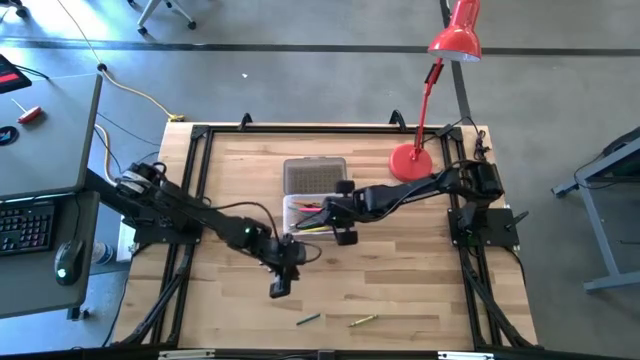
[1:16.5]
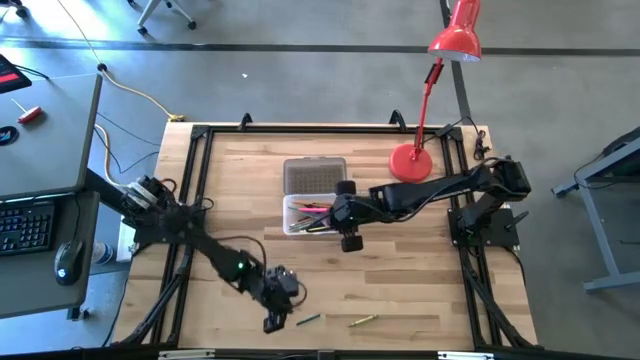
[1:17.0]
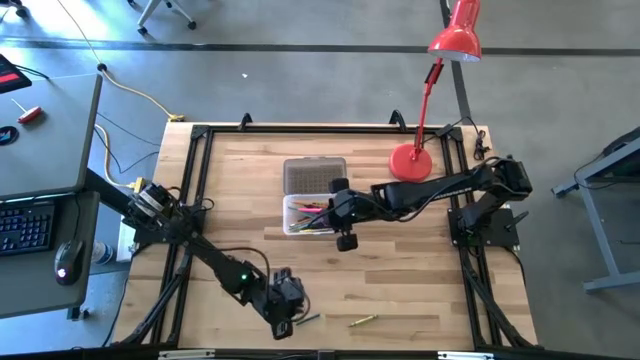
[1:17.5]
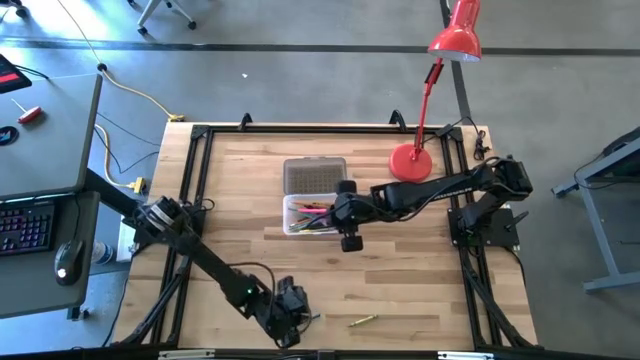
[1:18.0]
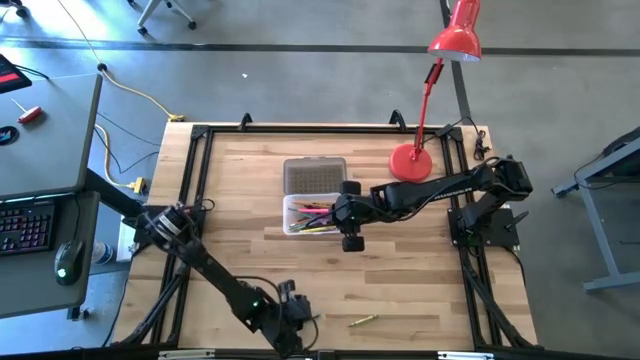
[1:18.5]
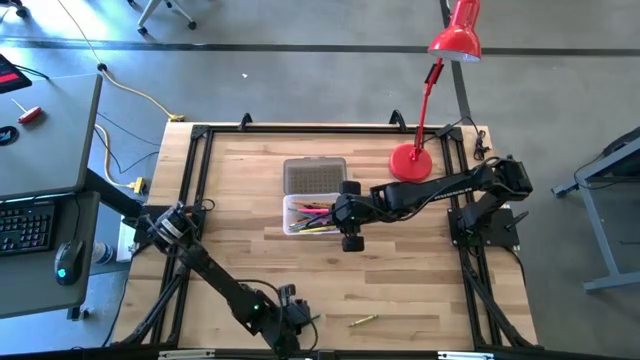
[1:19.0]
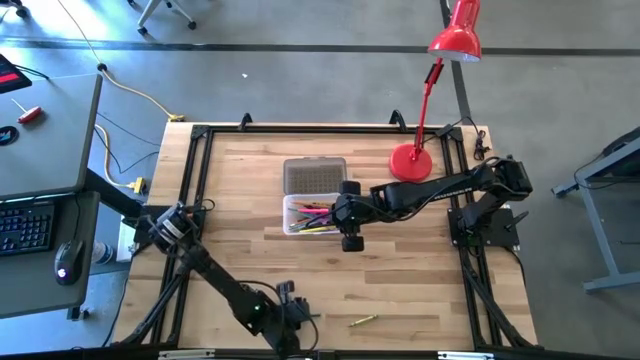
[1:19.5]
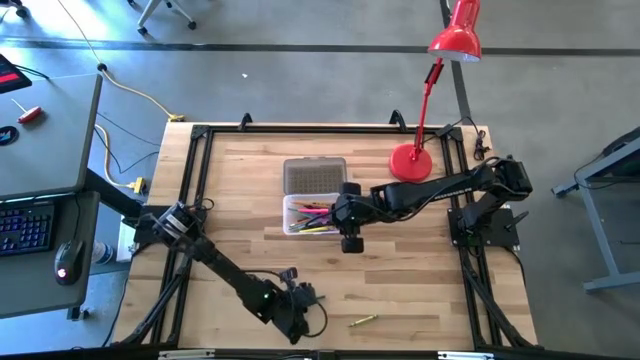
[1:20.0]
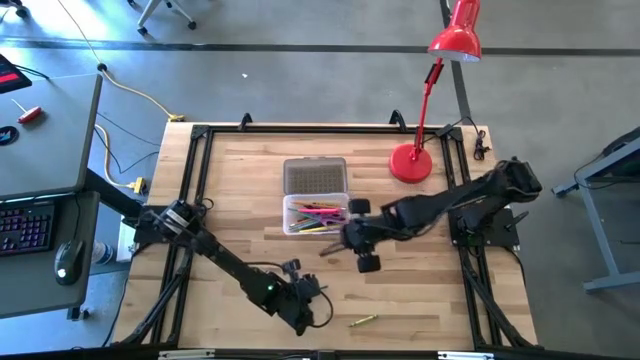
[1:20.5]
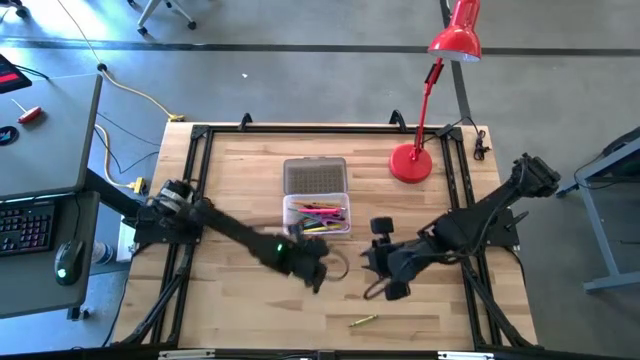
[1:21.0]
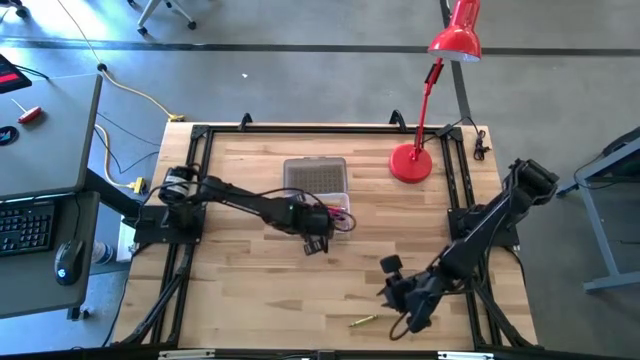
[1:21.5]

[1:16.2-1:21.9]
Task: Pick & place school supplies into a supply box
Put the dark green crayon into the supply box

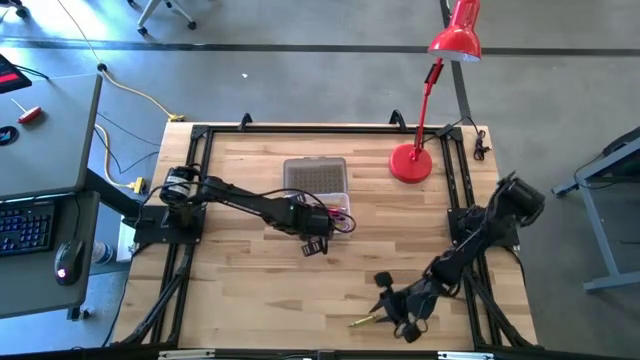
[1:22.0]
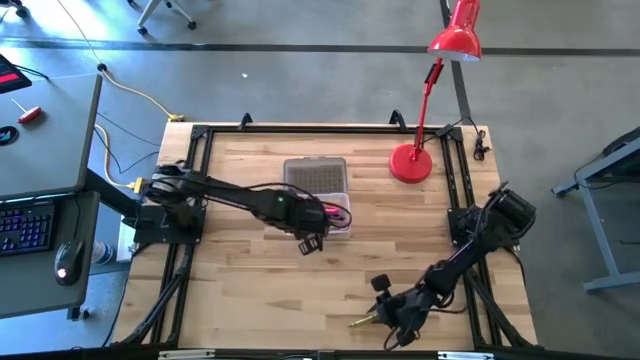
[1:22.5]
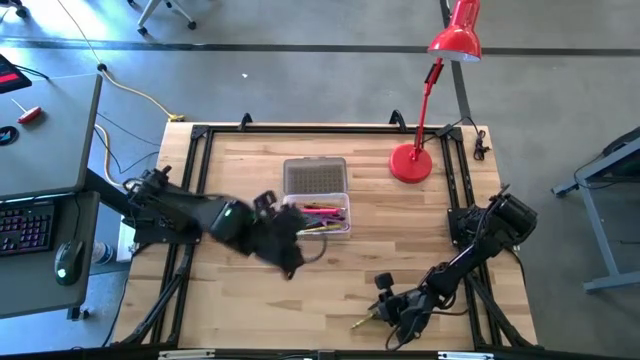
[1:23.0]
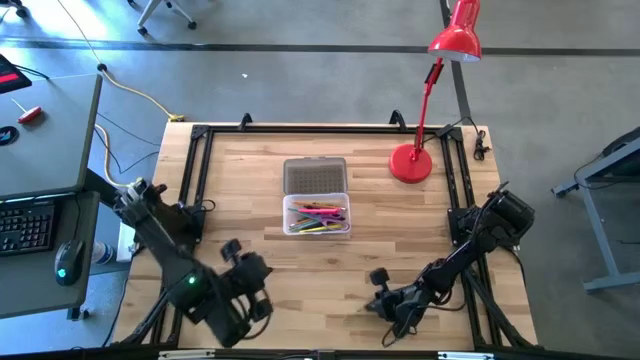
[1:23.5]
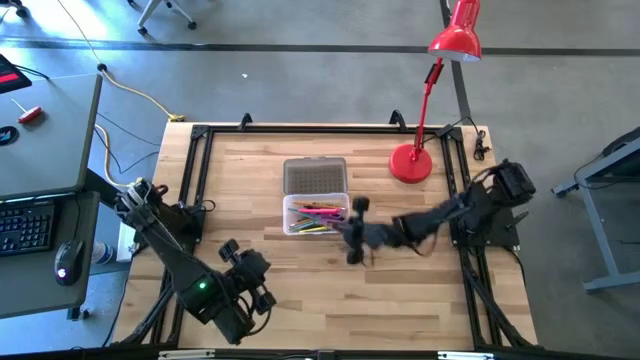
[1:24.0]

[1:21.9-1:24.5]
Put the green crayon into the supply box

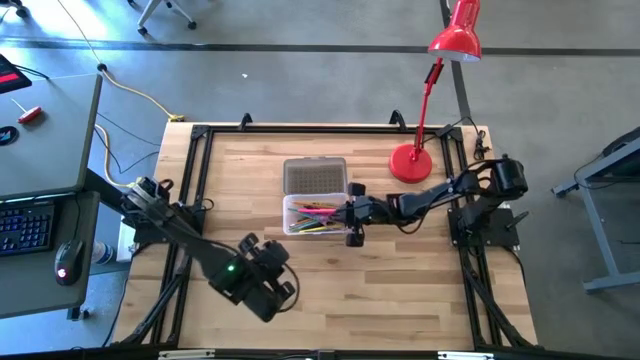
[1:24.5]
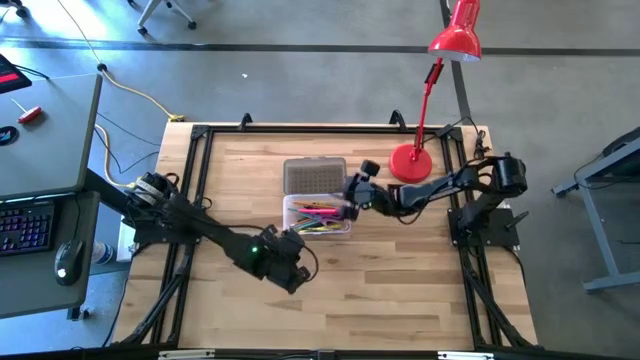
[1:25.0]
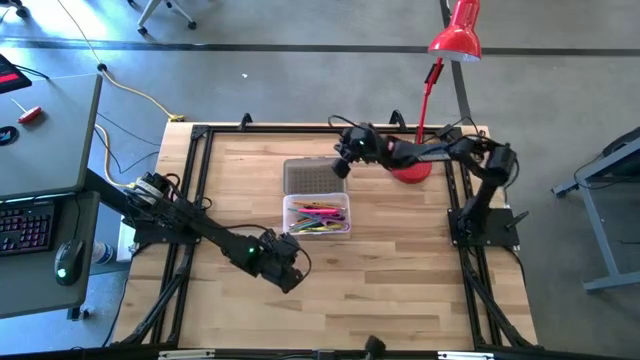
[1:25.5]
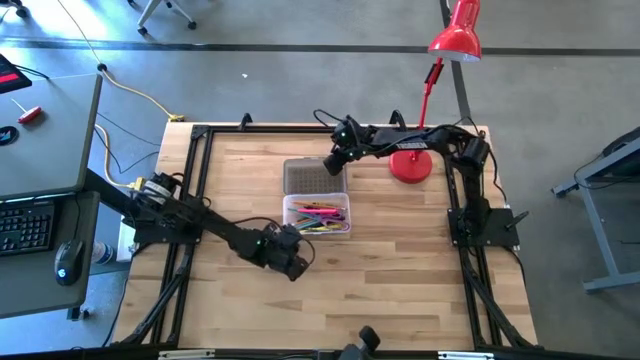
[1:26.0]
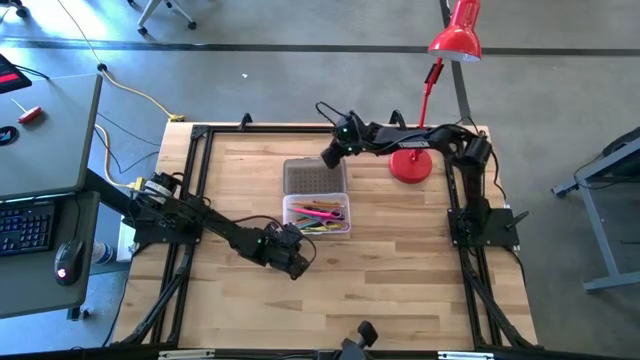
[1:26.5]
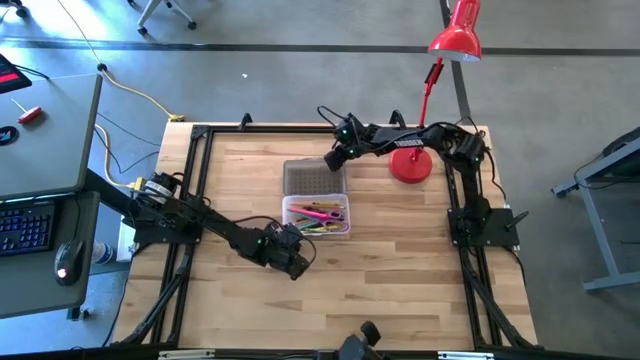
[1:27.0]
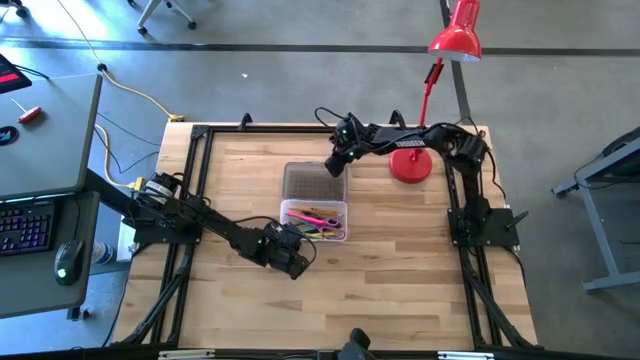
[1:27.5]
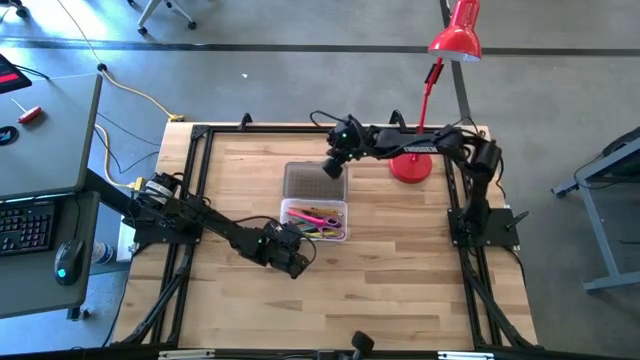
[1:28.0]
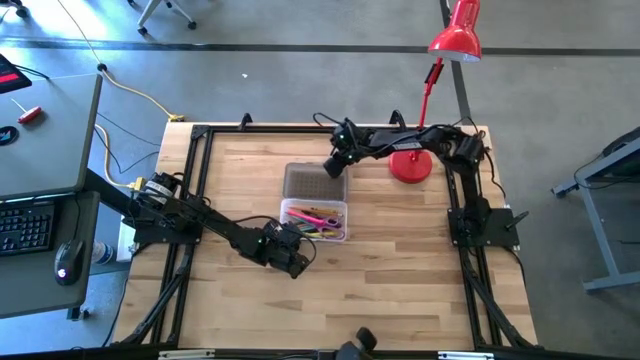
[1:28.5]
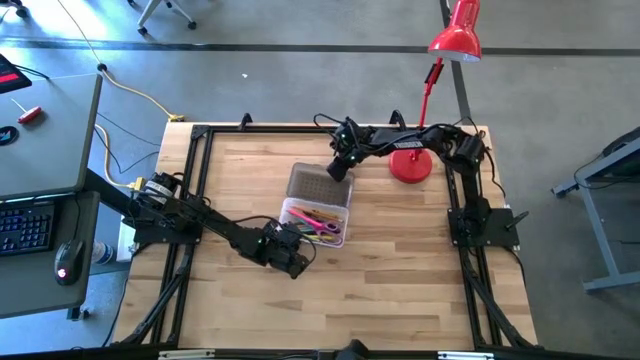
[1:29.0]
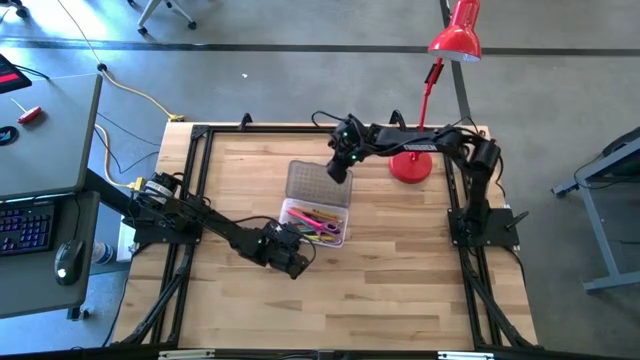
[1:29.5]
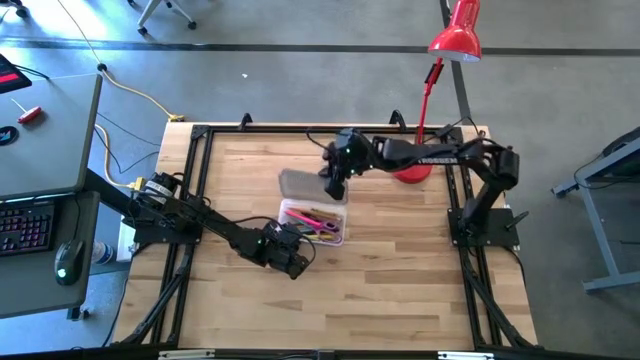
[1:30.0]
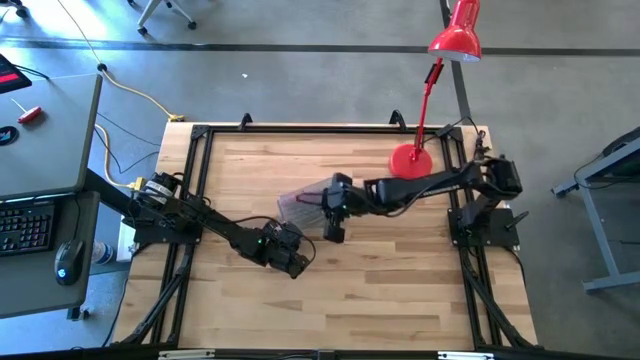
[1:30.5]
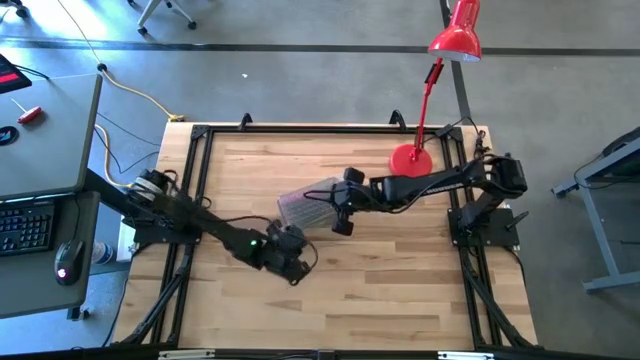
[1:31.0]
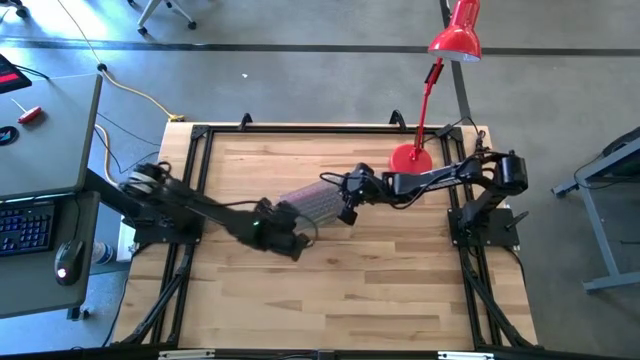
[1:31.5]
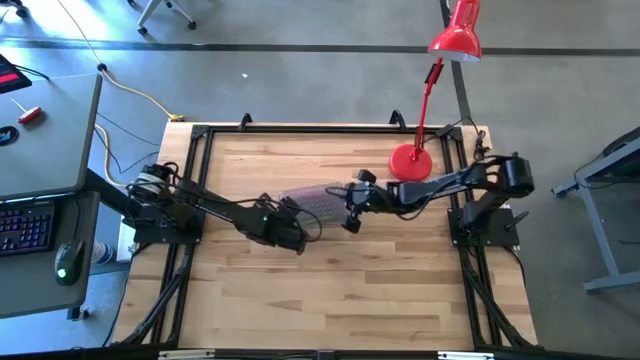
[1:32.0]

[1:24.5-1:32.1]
Close the supply box

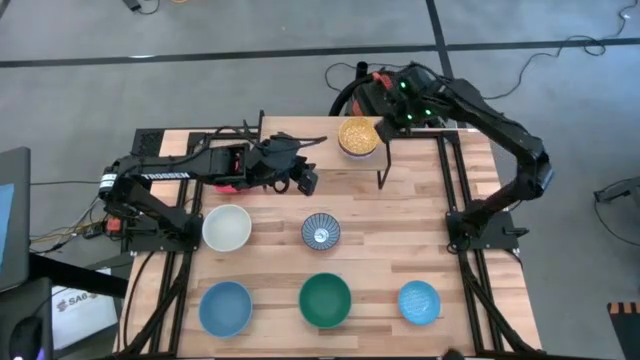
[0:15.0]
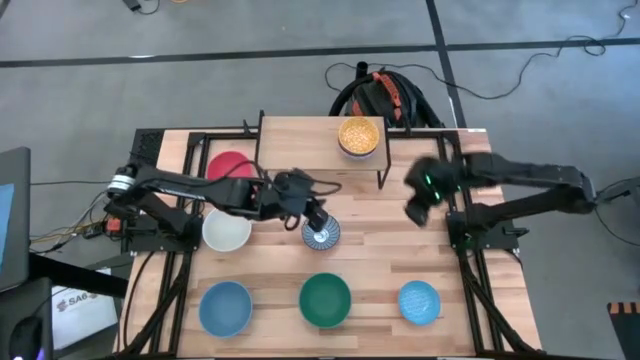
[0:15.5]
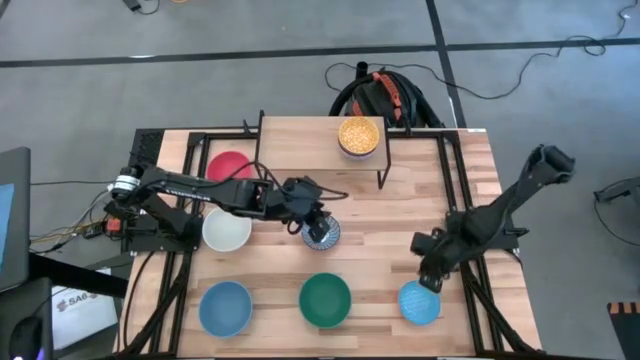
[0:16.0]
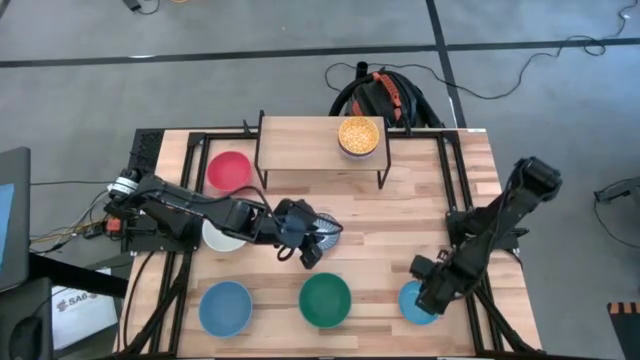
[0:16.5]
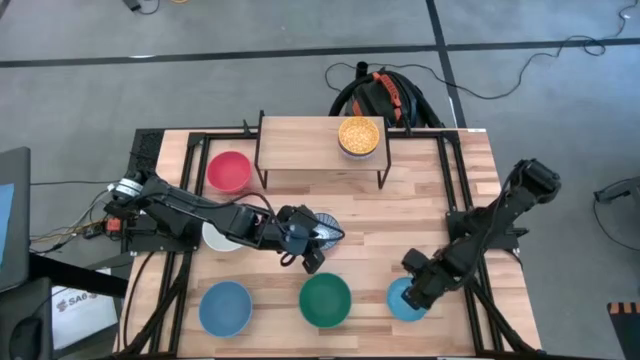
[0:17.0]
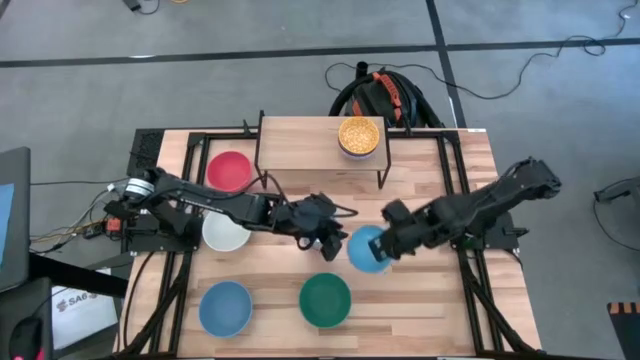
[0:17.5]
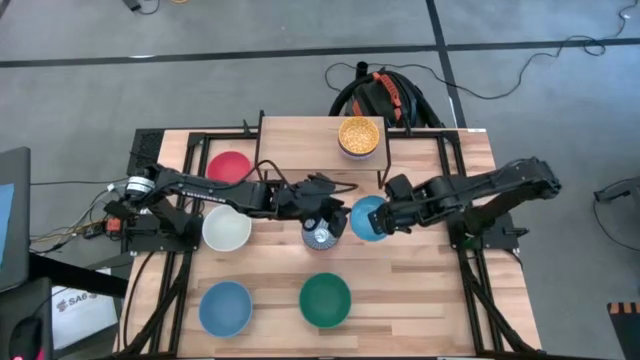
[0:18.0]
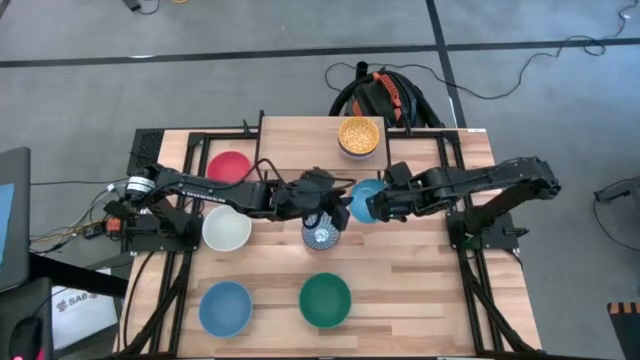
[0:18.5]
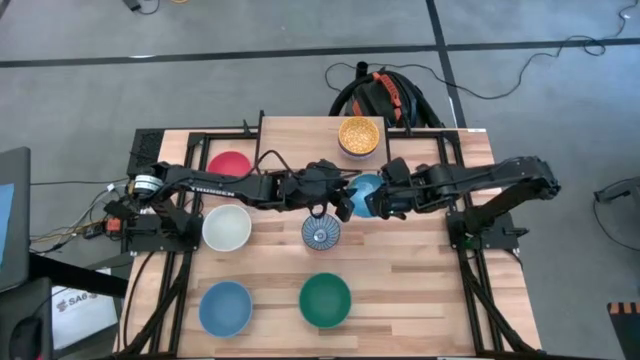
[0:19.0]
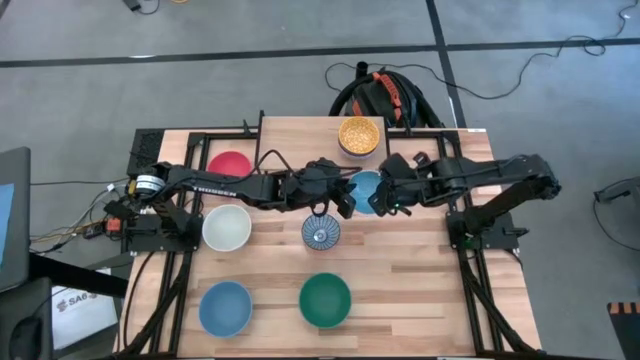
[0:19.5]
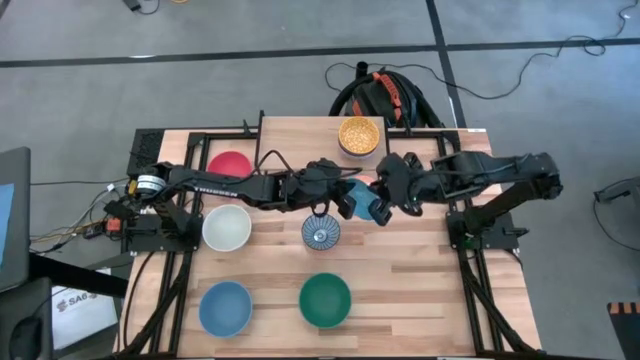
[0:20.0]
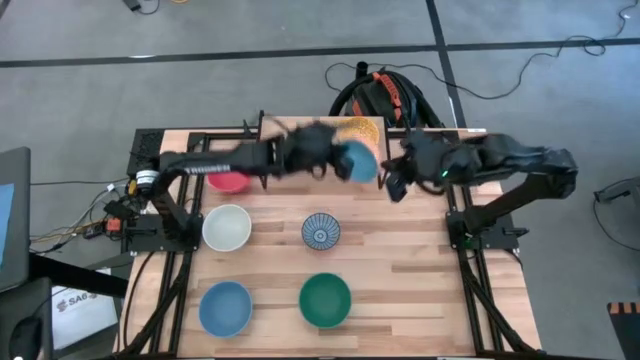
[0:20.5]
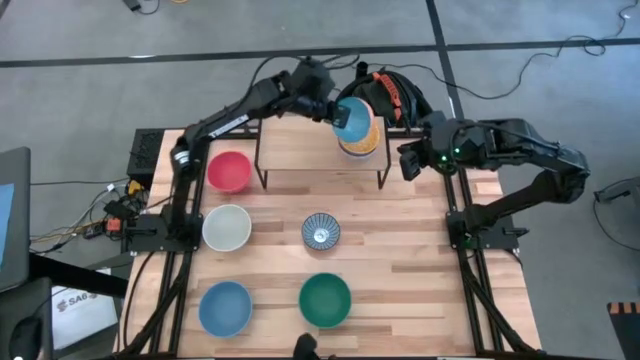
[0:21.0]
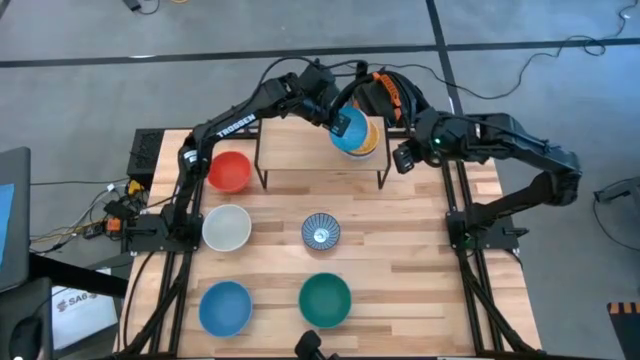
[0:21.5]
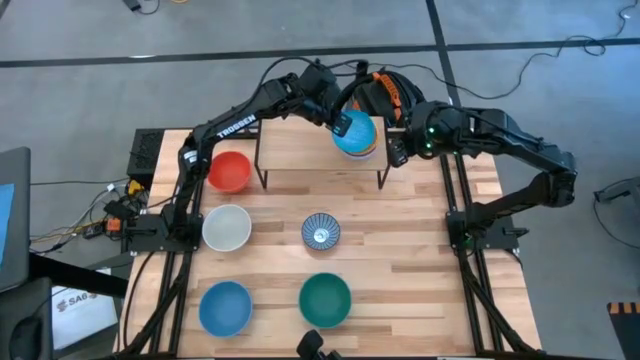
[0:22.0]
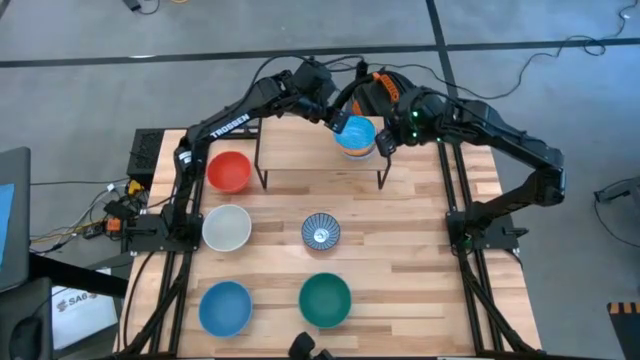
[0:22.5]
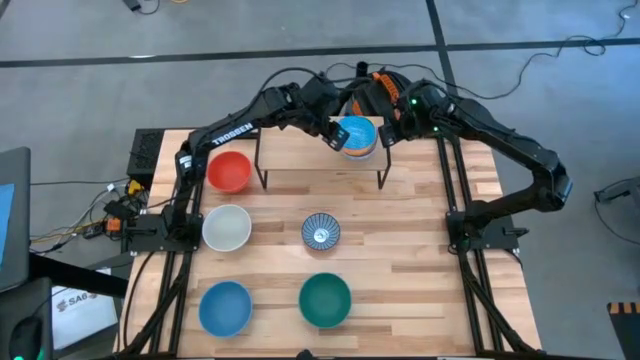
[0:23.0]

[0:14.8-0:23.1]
Task: Place and stack bowls onto a shelf
Stack the blue patterned bowl on top of the yellow patterned bowl
